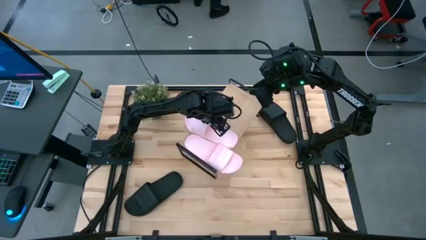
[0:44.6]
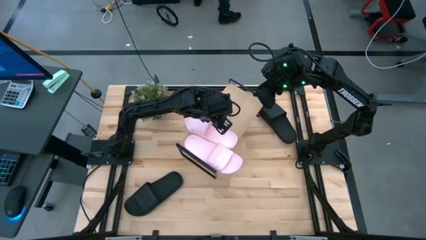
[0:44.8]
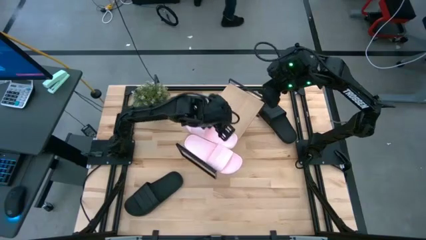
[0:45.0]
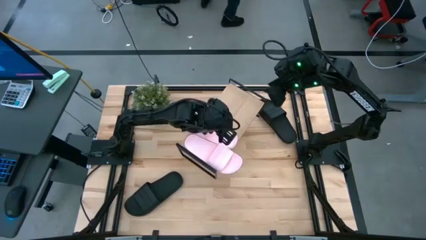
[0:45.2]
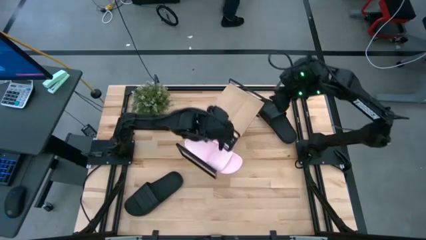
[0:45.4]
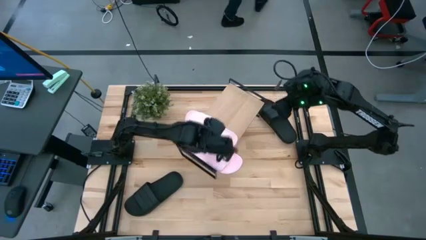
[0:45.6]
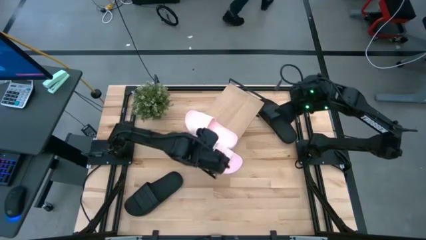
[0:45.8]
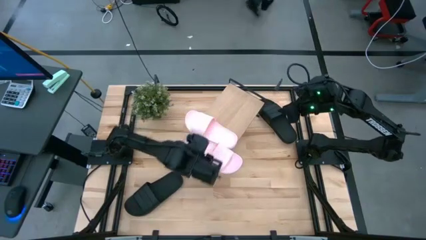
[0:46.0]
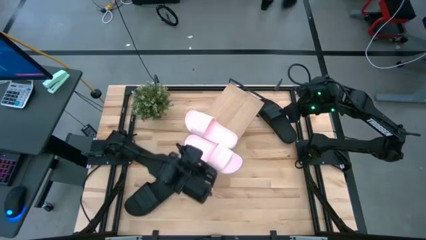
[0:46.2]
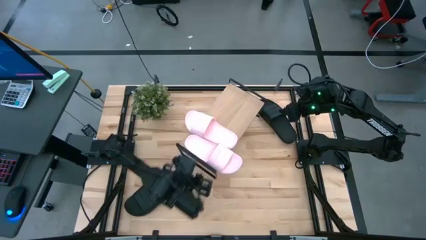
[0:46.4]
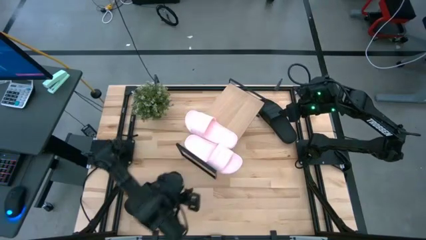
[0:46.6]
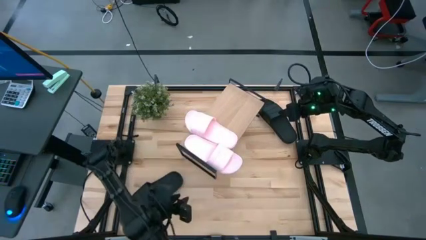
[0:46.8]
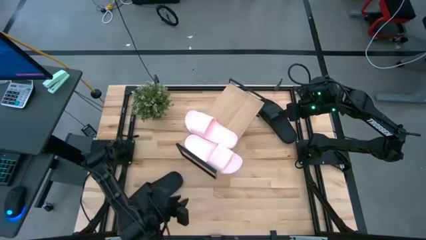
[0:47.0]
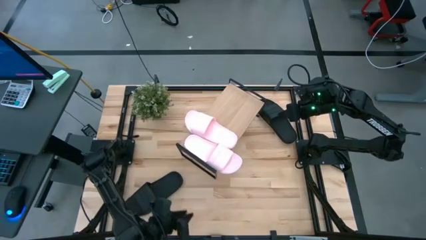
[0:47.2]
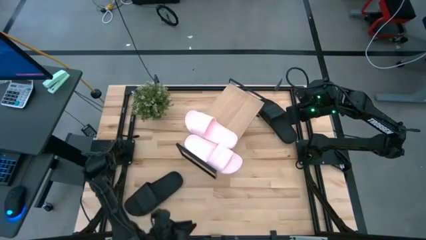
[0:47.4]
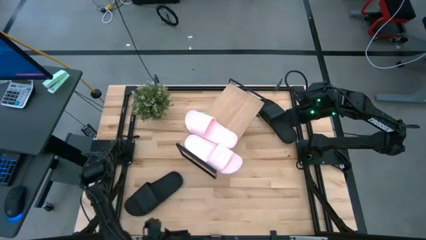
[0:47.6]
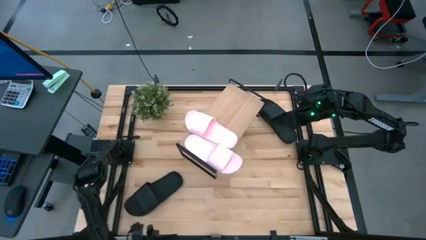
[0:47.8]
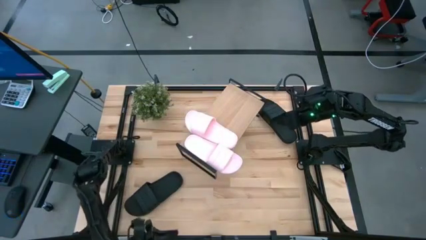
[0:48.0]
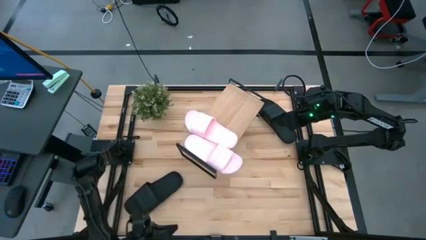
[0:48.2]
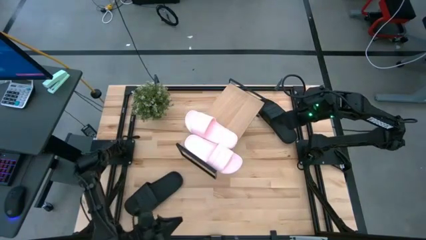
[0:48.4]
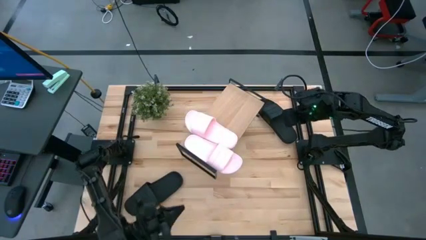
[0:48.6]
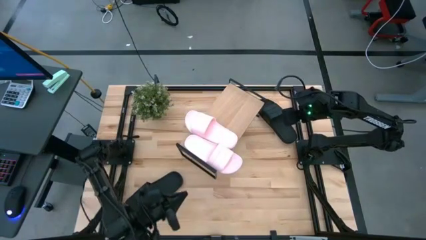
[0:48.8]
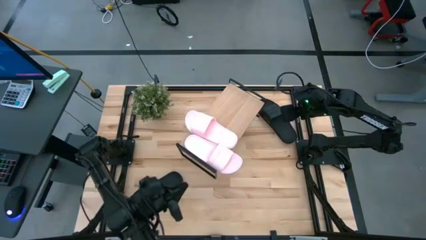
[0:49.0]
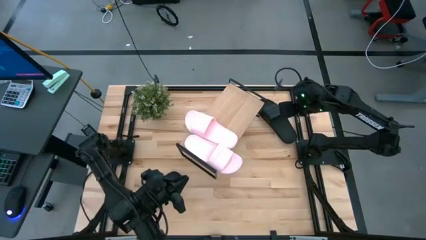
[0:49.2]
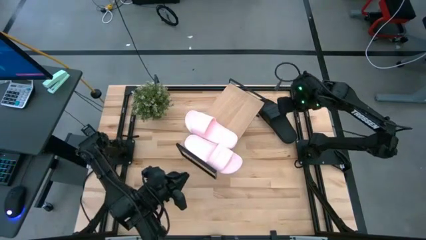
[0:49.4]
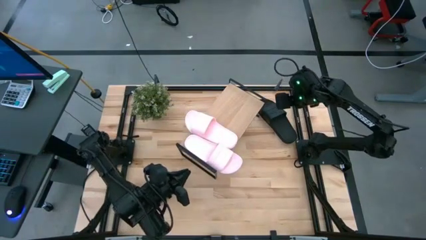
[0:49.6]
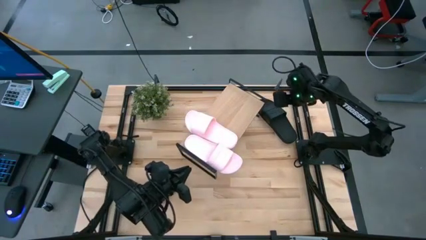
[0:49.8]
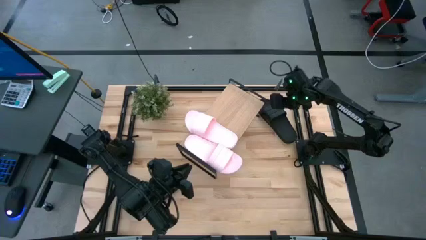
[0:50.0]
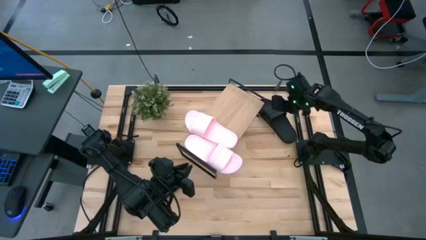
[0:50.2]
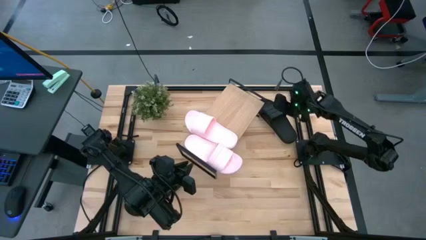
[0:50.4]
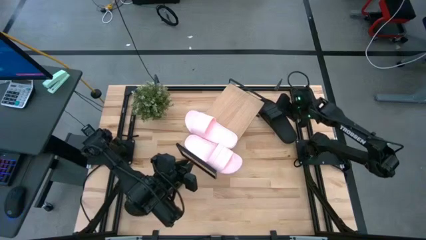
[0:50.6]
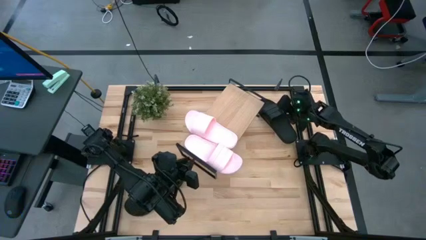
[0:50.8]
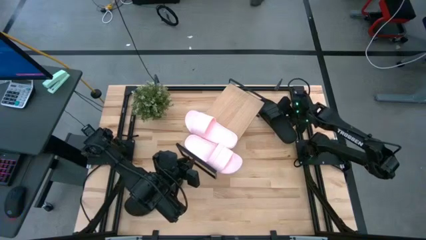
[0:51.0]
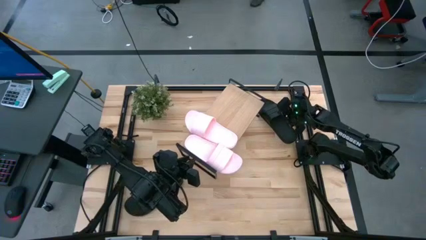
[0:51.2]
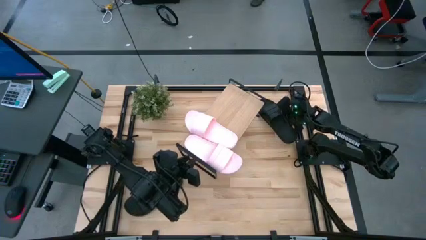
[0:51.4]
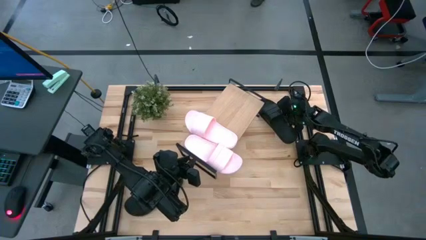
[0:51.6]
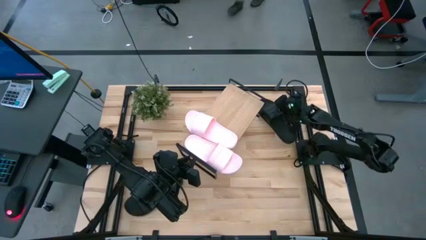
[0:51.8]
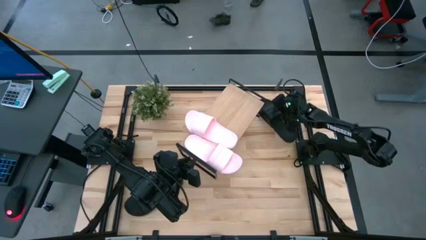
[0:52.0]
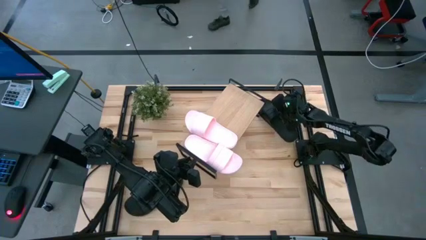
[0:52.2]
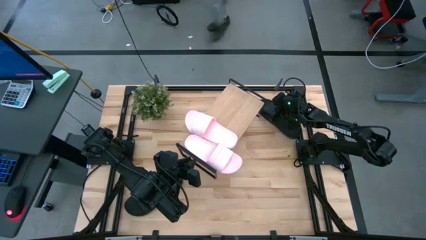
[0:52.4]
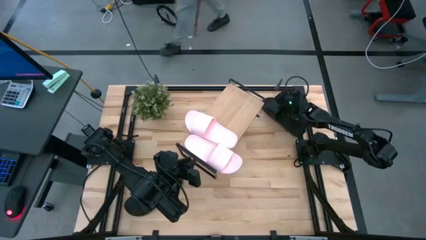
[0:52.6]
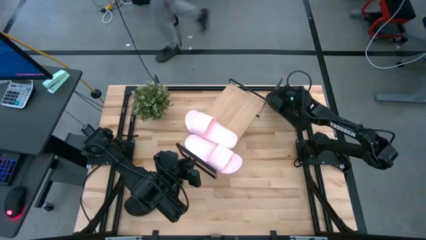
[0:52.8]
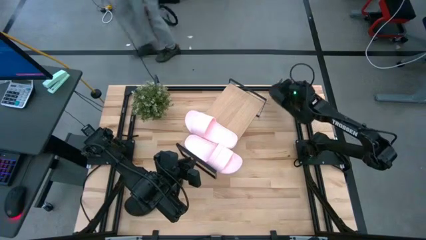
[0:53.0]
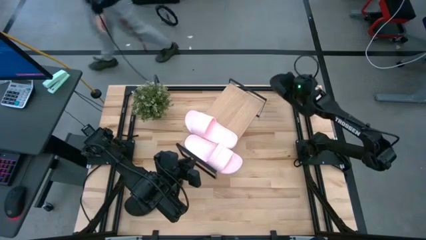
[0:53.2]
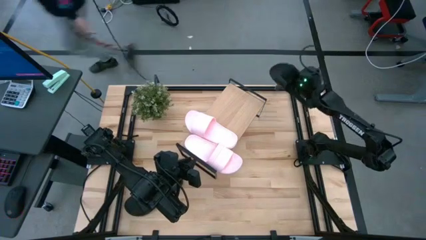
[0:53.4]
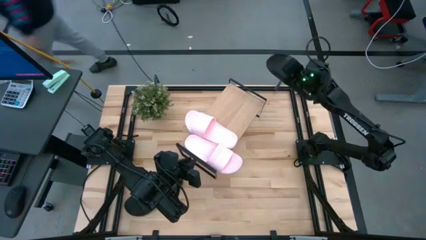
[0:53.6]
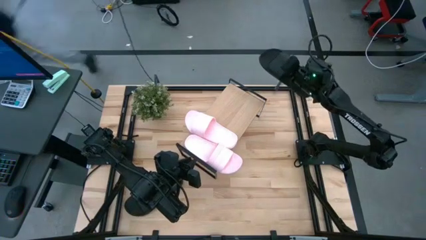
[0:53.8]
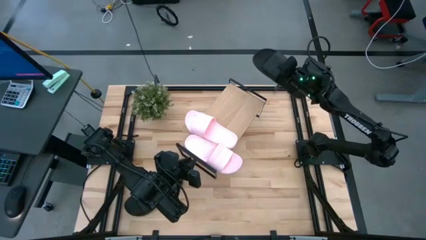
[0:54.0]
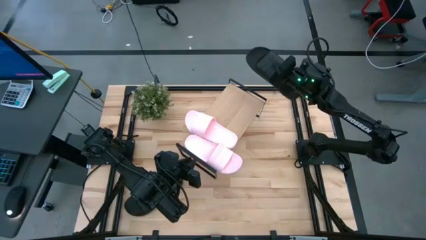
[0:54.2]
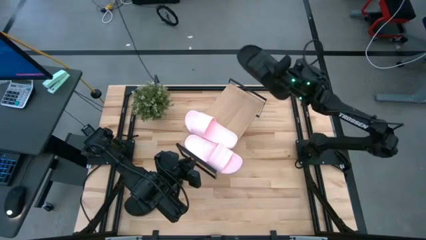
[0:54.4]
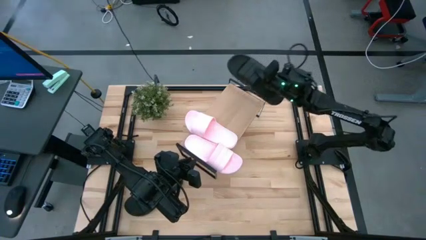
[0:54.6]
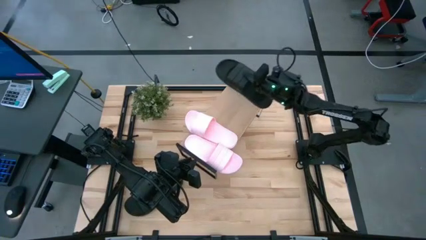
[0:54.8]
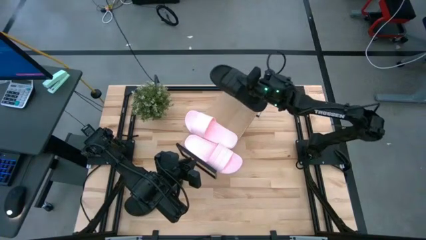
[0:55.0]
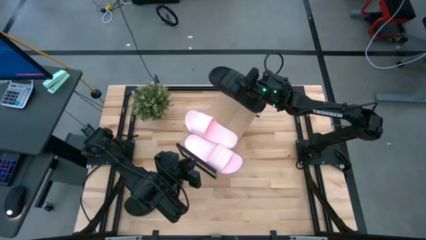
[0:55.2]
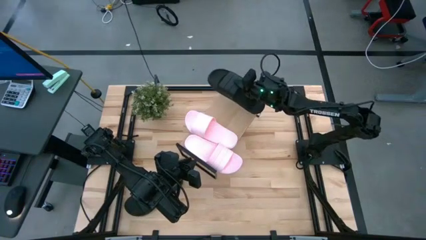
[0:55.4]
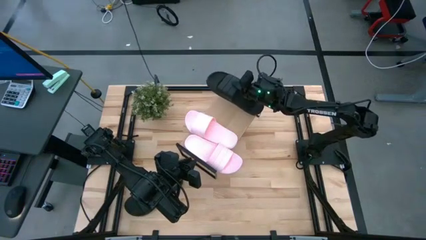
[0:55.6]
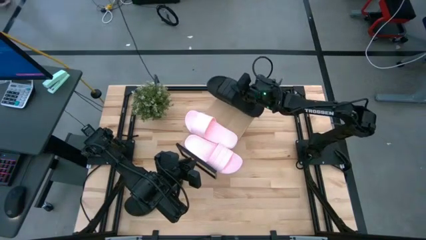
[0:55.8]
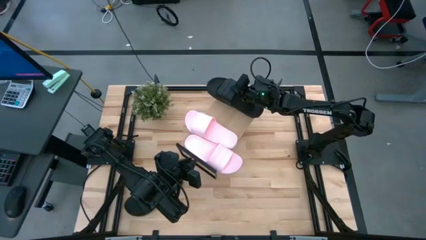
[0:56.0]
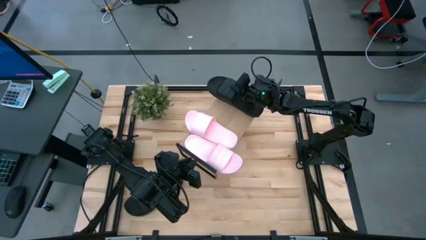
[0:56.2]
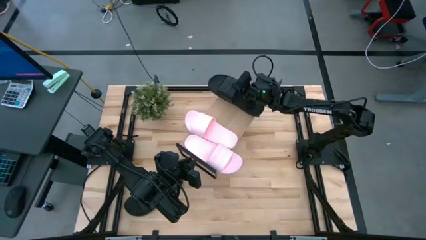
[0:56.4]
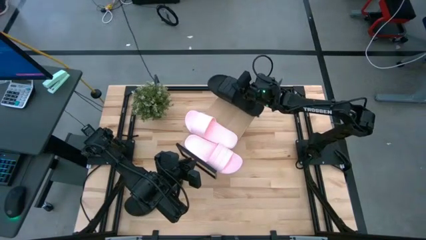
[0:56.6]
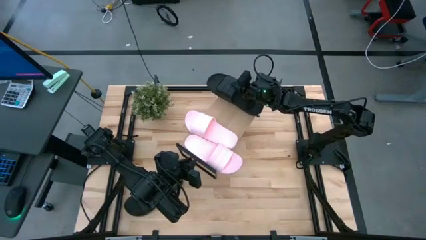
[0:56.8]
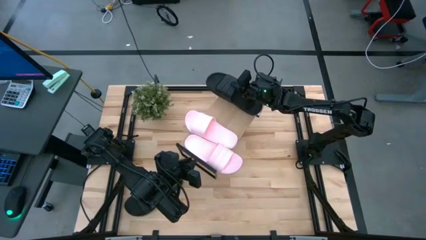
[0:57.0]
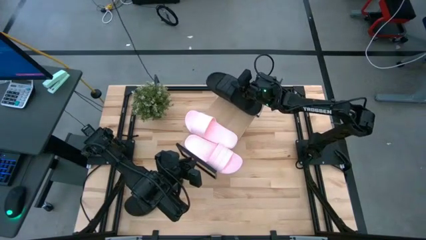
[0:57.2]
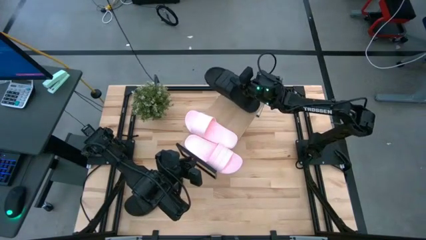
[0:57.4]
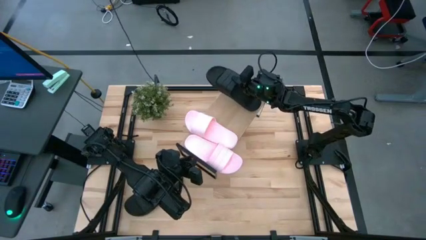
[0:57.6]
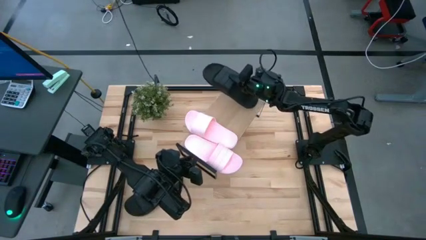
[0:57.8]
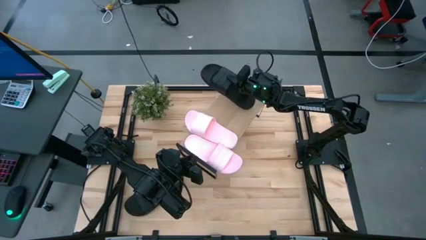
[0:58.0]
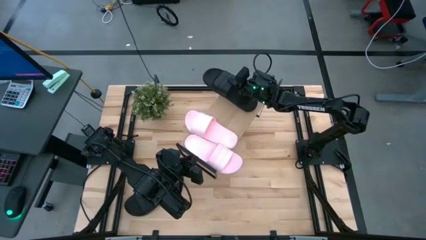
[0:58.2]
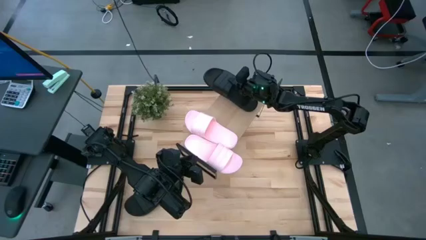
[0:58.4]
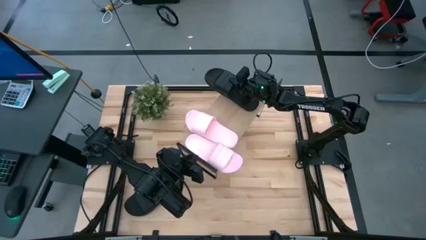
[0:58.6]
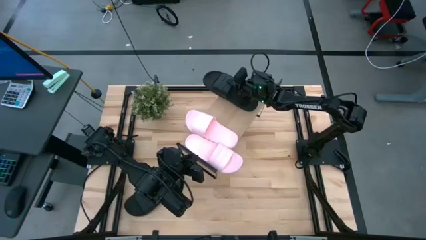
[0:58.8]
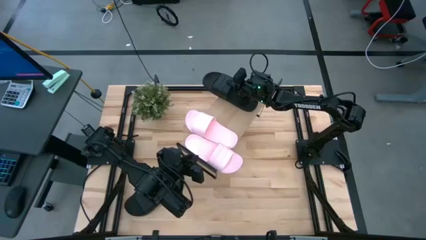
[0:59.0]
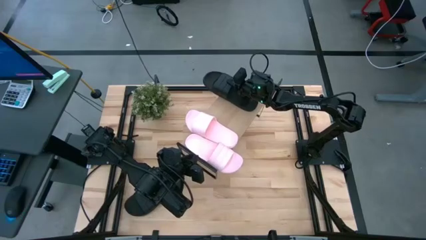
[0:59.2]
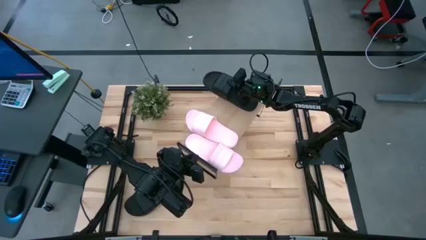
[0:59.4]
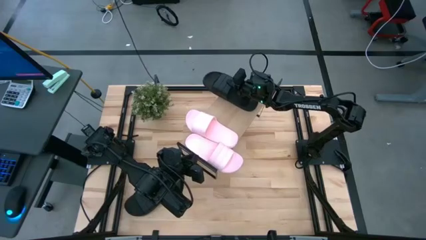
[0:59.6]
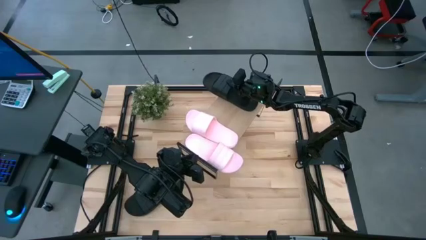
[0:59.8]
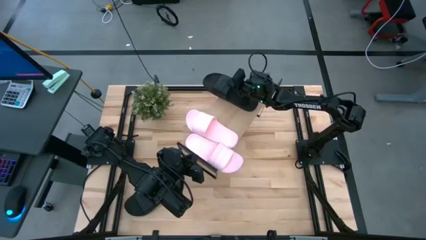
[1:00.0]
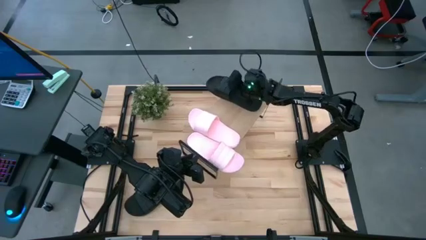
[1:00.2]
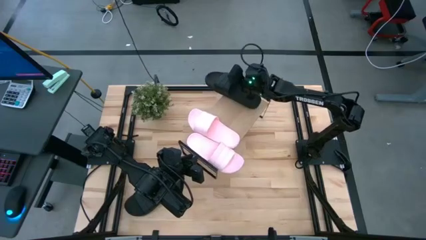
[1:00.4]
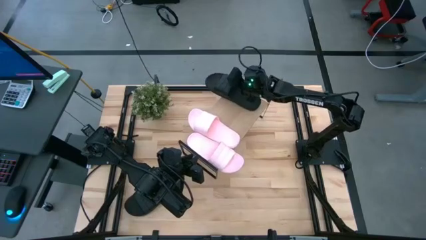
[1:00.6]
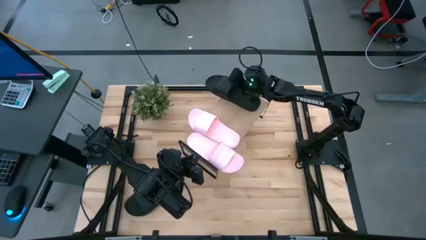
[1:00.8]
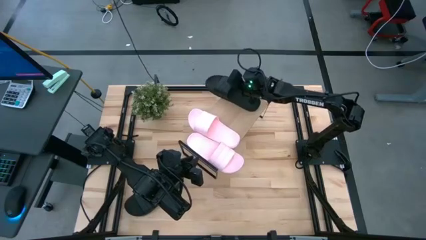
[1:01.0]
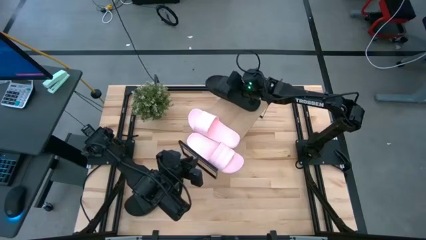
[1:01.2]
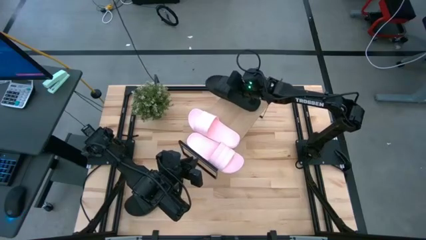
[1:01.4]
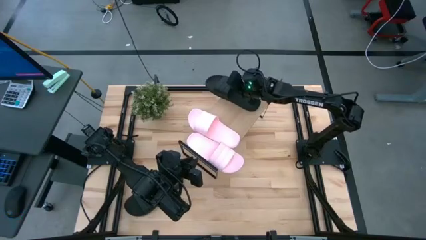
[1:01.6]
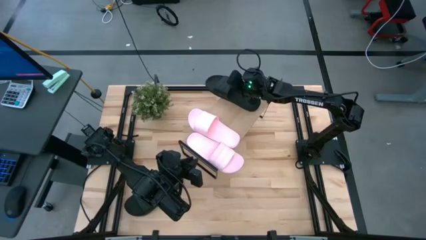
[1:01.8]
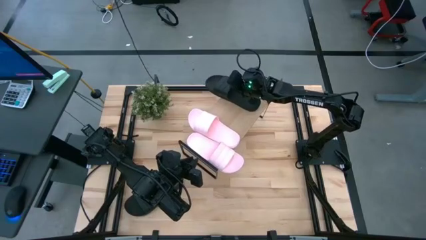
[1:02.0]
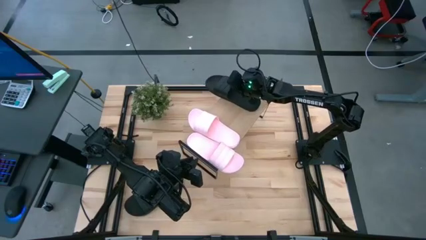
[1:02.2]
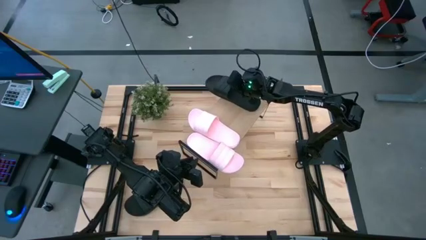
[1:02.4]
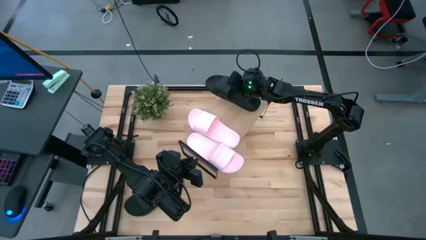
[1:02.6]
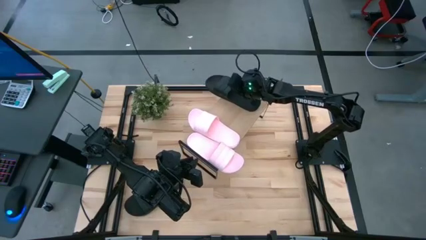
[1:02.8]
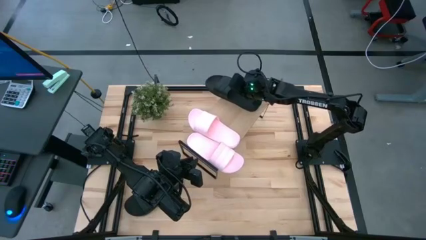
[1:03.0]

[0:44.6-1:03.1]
Task: Pick and place slides into the shelf
Put the top black slipper on the shelf
